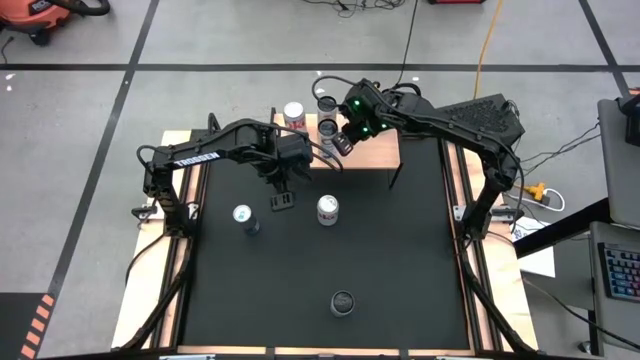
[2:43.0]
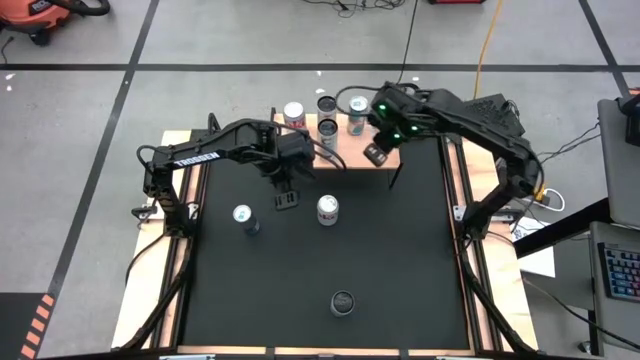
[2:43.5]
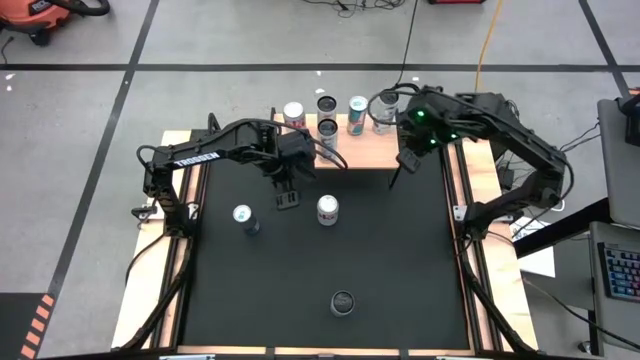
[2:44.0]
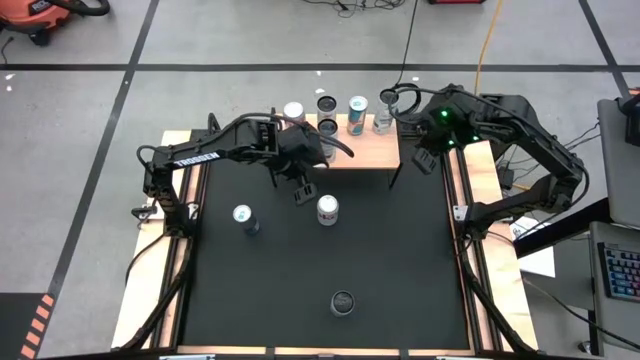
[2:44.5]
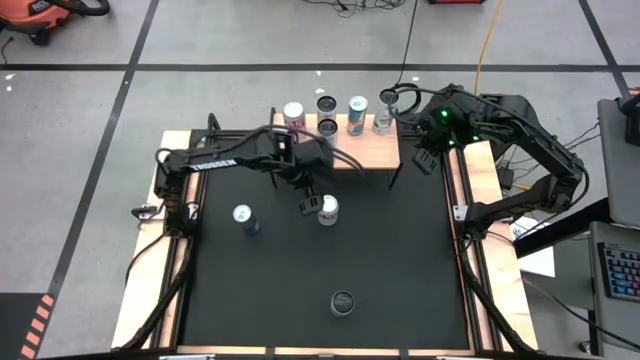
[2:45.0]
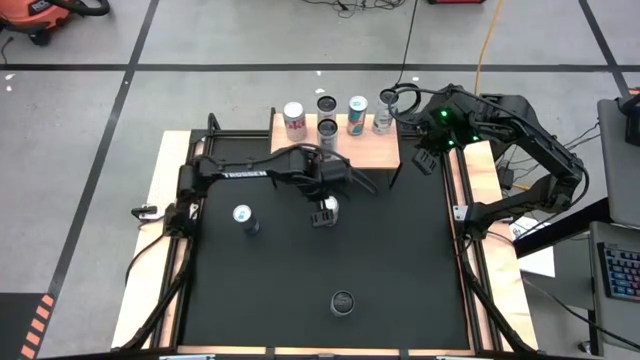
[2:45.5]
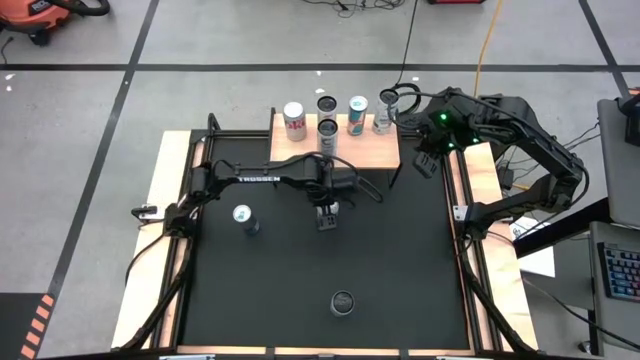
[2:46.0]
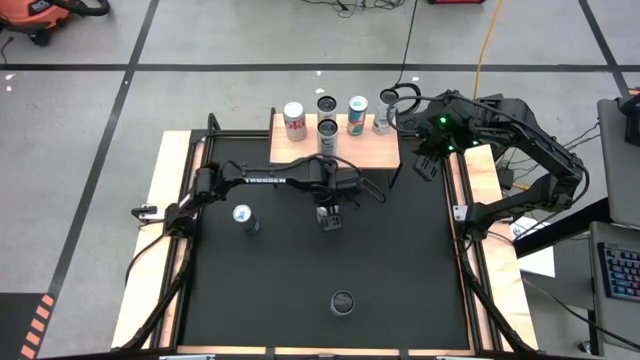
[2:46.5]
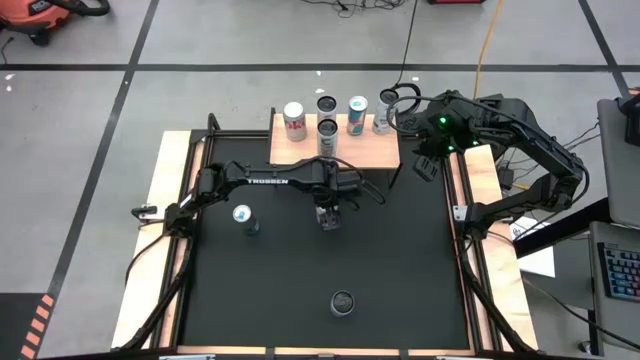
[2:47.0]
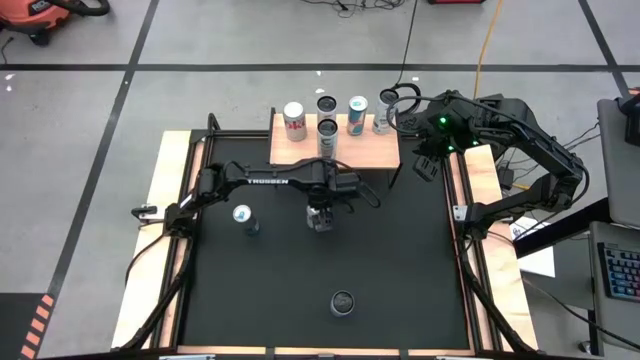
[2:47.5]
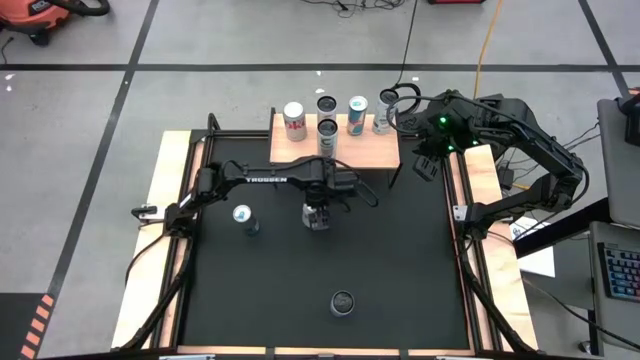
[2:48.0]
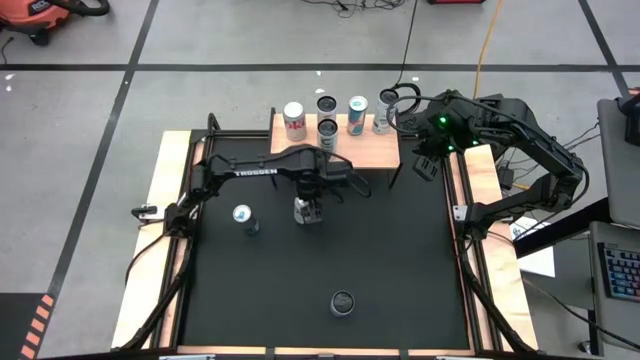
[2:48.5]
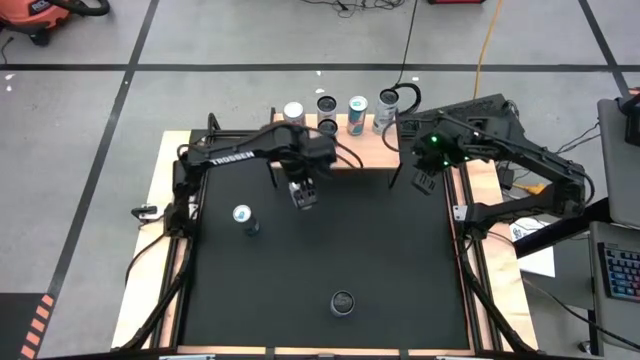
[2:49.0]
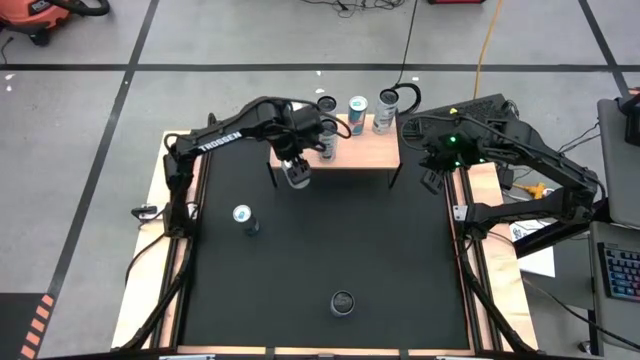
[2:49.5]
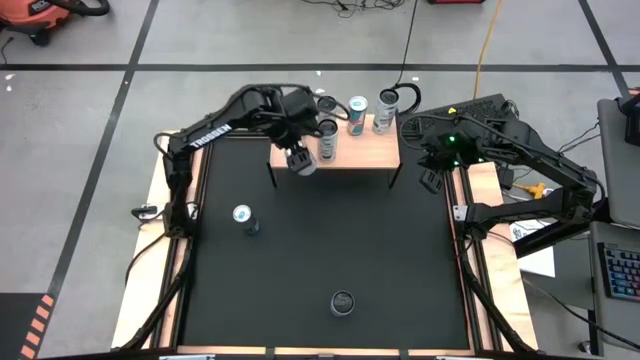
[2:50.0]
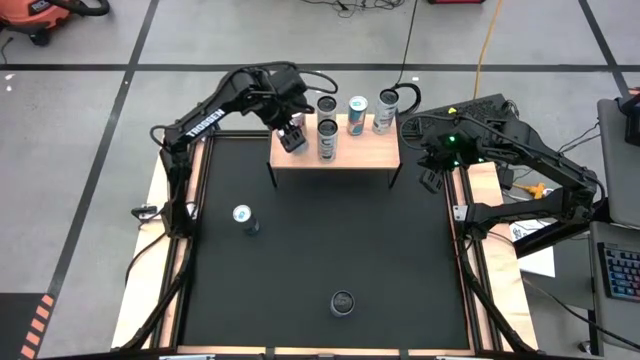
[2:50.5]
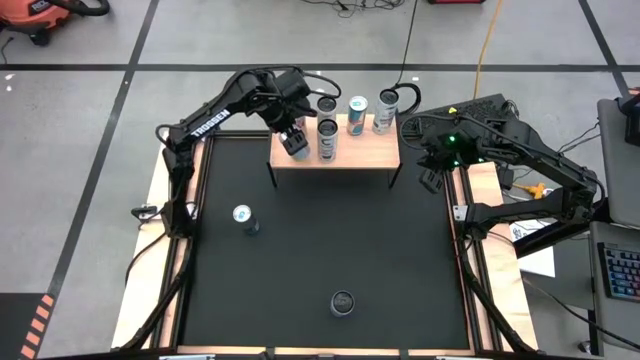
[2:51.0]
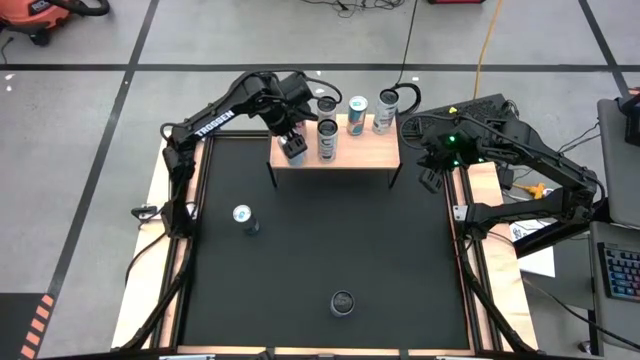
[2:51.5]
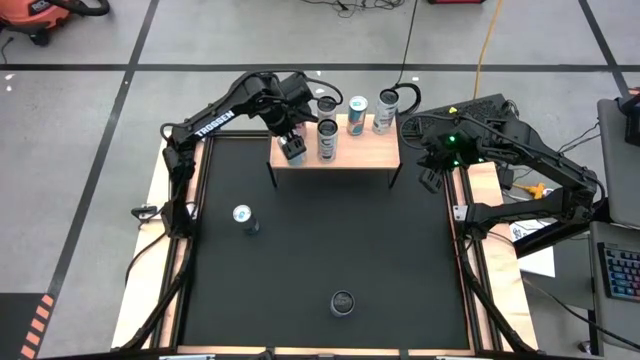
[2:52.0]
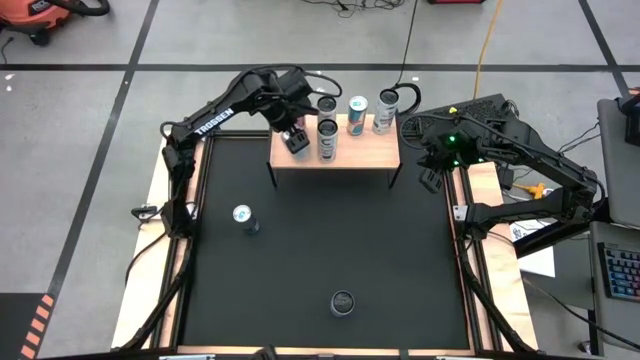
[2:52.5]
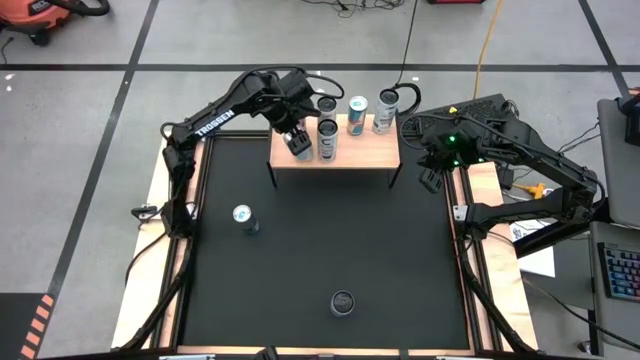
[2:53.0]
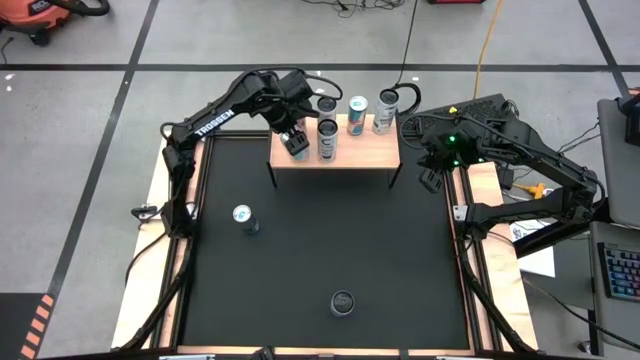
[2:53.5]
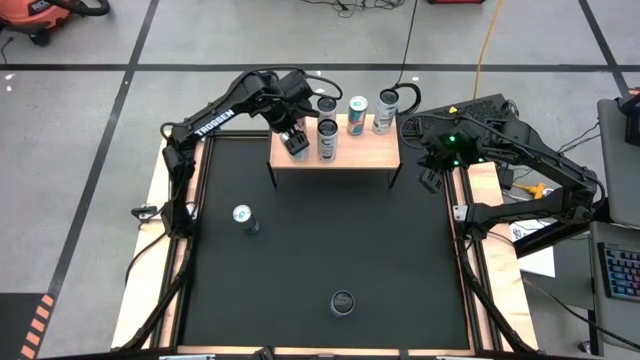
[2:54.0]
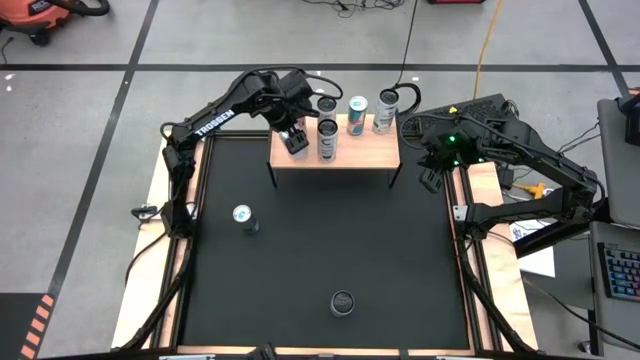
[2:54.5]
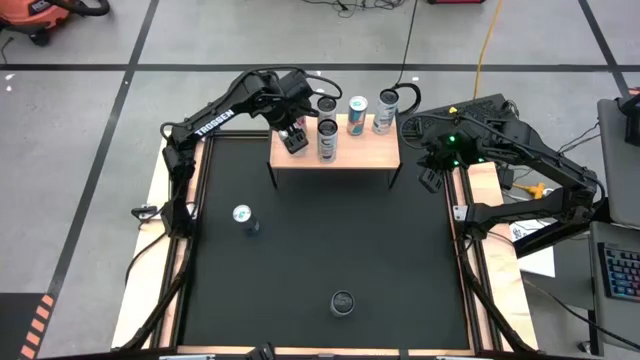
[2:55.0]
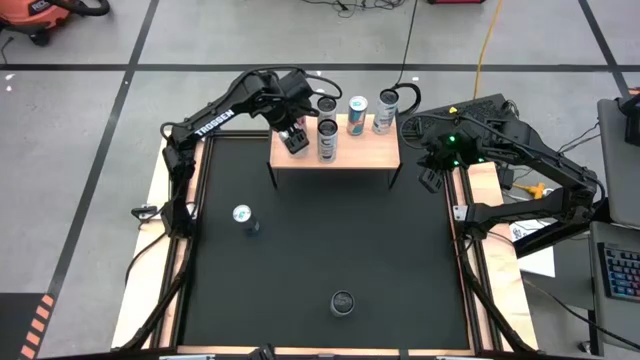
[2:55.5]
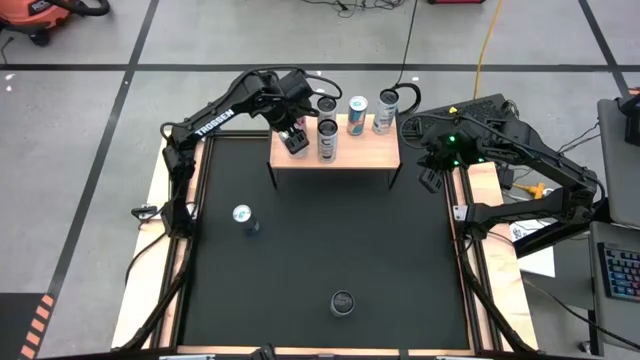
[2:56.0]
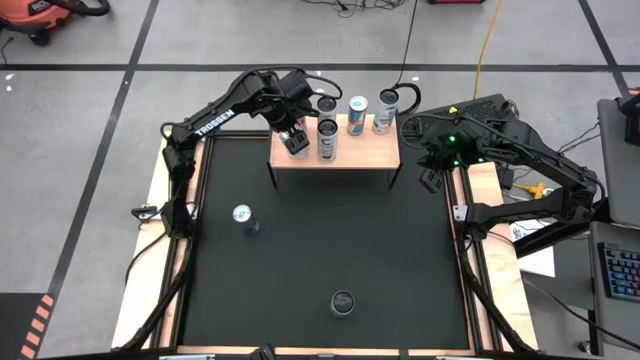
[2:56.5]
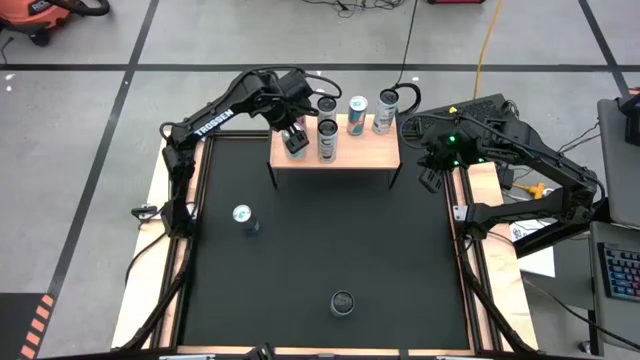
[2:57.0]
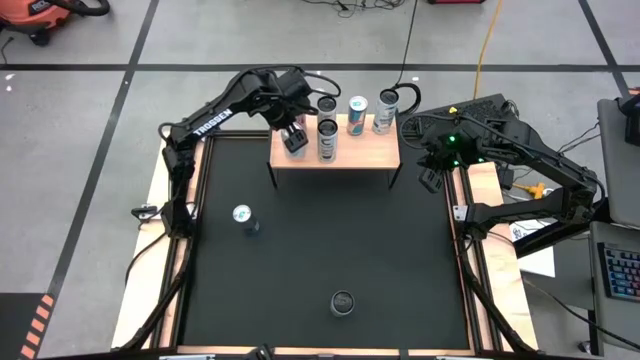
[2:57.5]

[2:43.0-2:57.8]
Task: Place canned beverage on shelf
Put the red and silver soda can aligned with the other red and silver soda can on the shelf
